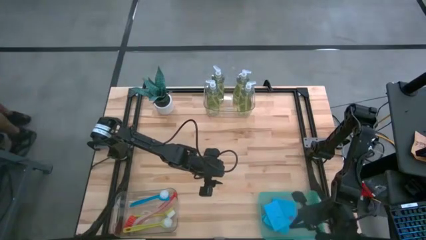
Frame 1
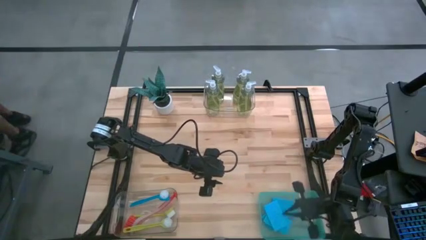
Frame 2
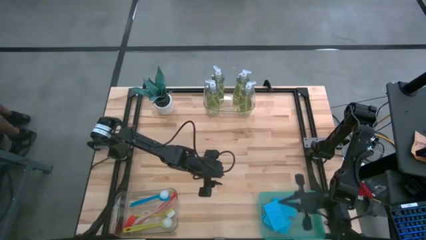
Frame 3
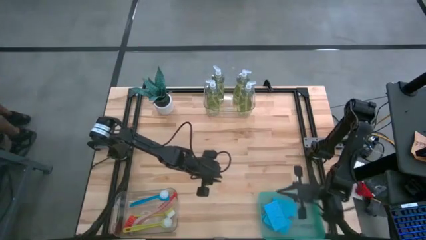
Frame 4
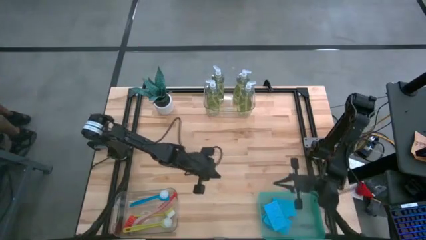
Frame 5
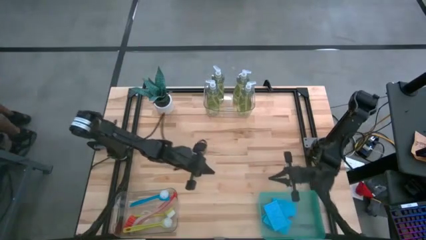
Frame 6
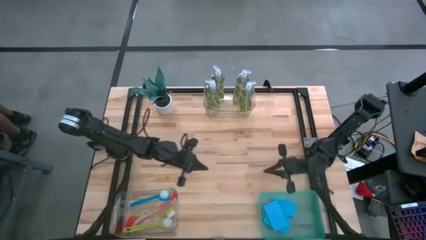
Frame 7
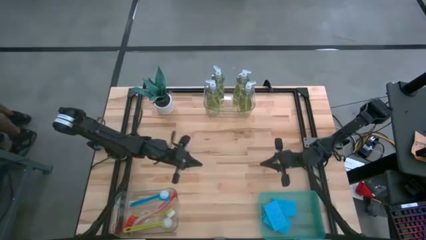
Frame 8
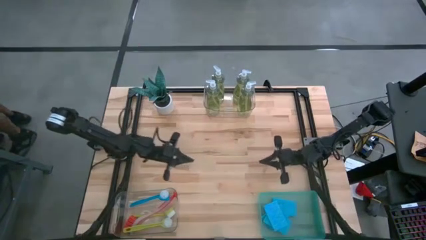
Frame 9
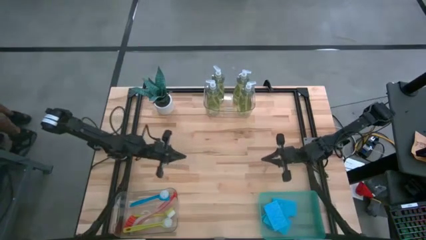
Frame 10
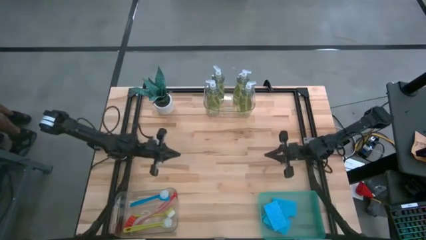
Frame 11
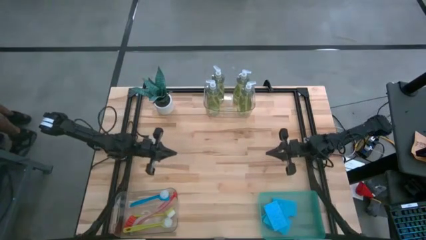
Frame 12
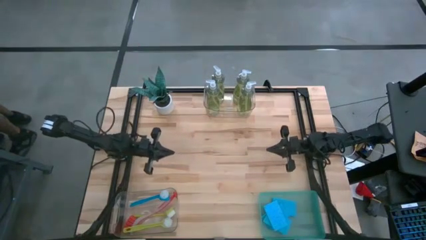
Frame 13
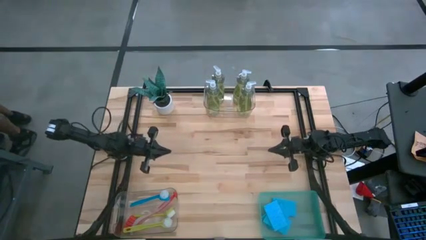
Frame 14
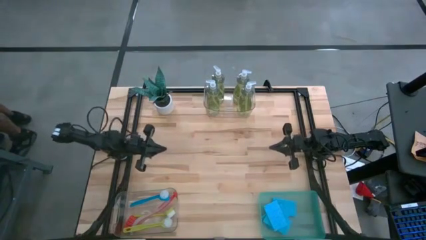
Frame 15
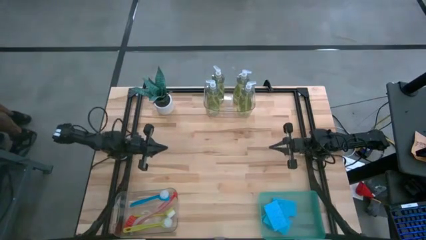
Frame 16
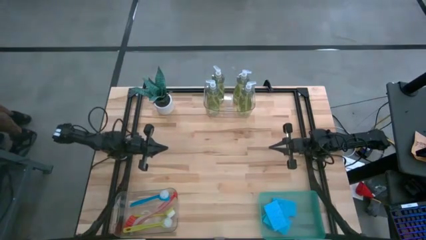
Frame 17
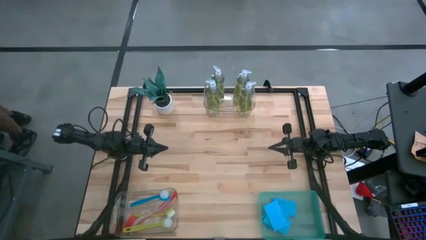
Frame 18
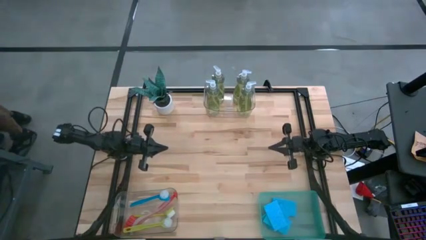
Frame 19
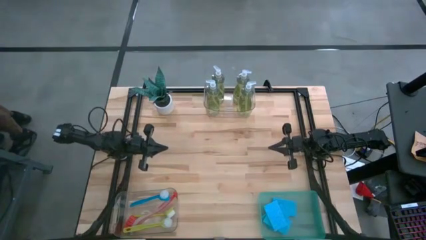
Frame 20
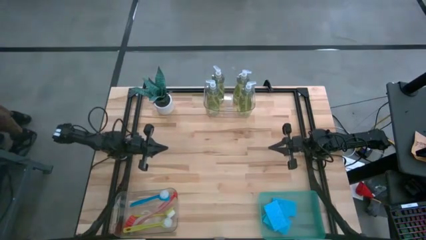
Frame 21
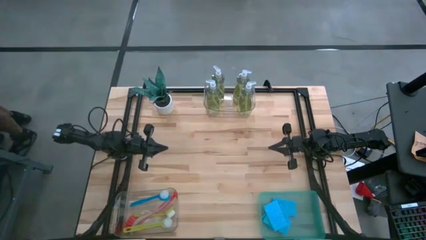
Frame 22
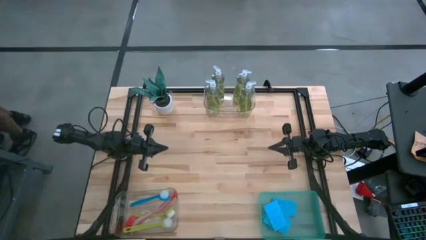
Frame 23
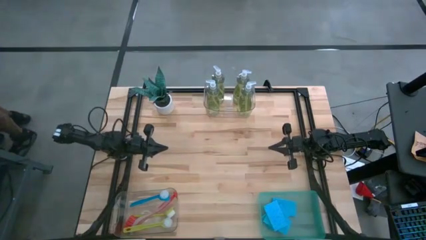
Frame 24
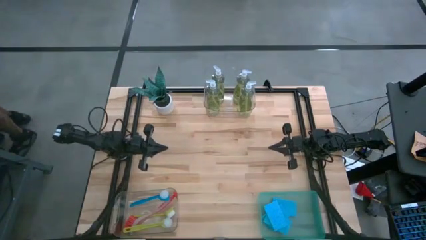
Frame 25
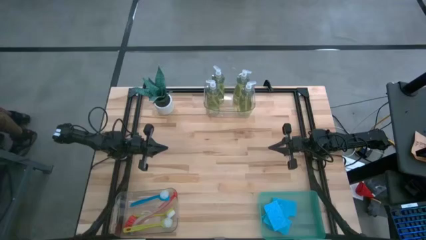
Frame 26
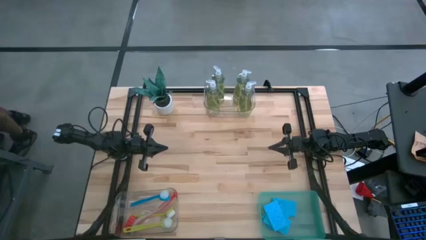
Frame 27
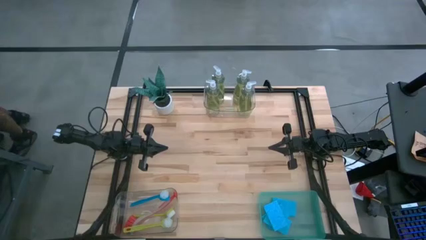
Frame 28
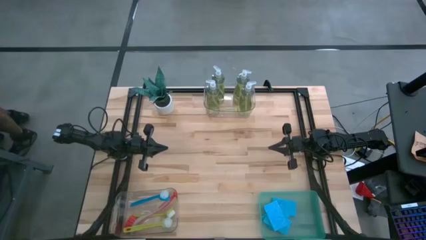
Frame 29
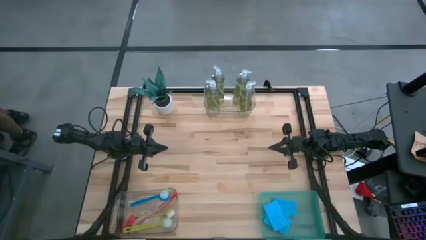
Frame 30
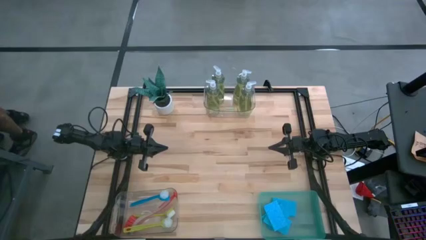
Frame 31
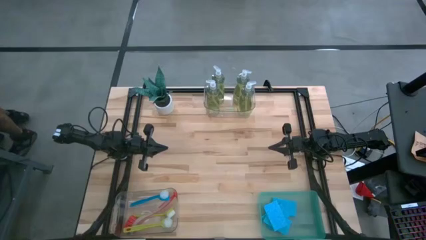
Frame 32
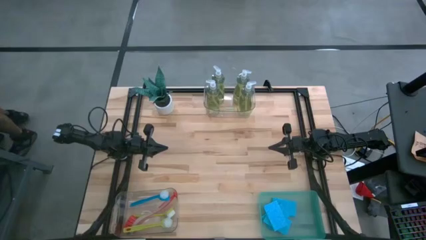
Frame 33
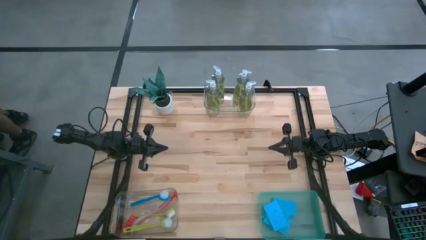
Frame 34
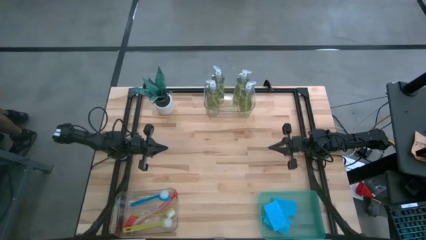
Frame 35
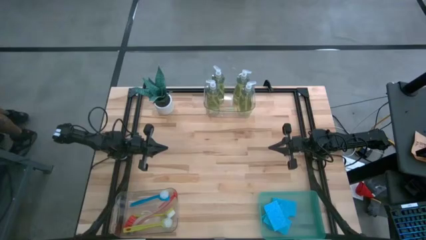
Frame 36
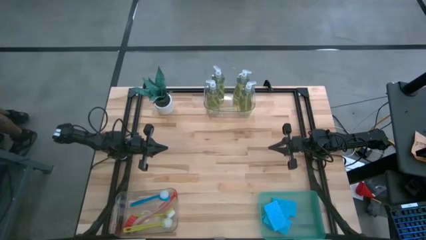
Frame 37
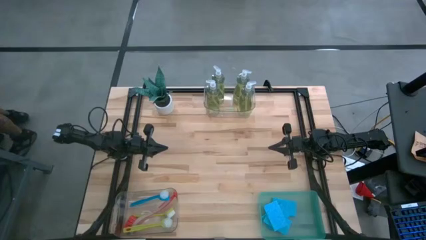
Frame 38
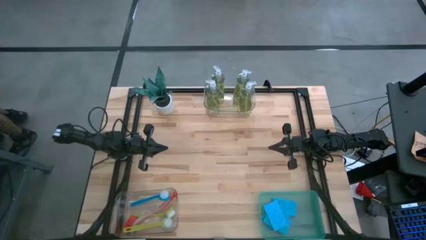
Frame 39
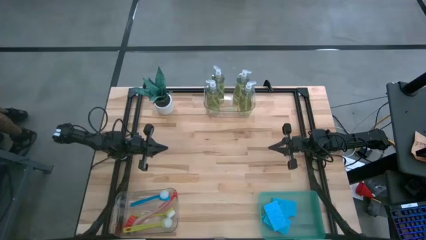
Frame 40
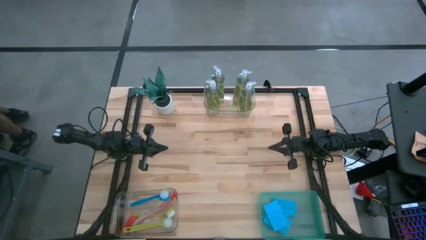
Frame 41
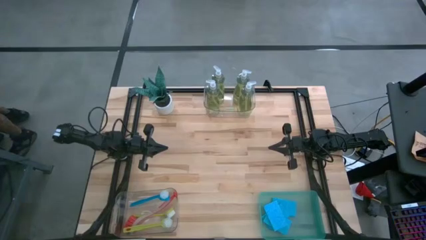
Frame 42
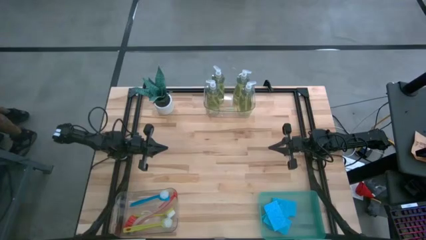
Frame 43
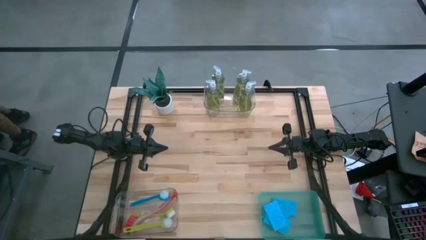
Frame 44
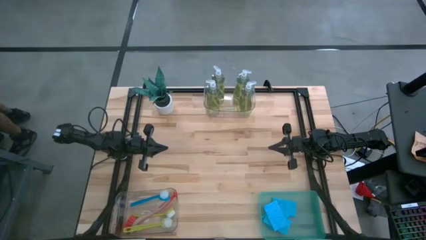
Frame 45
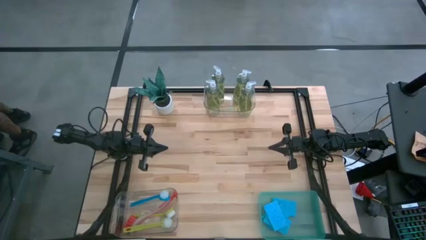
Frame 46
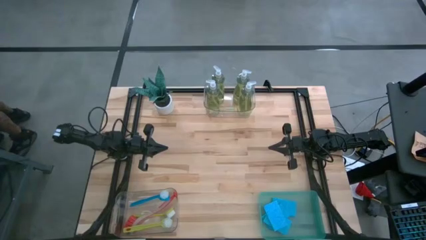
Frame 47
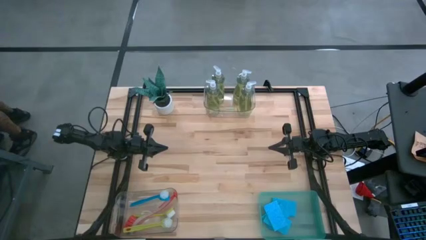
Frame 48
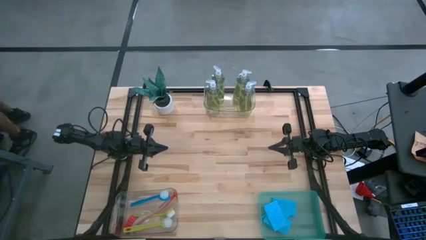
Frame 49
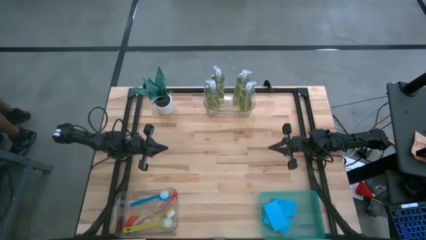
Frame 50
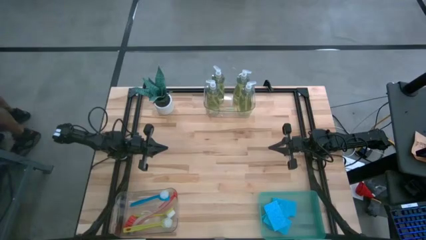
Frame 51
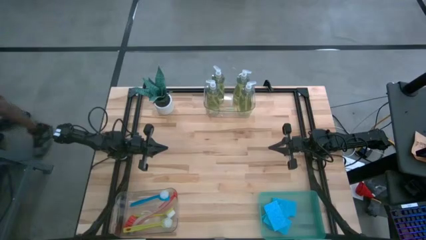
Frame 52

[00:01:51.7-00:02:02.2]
Task: Pick & Place Kitchen Sink Supplies
Return to Home Position

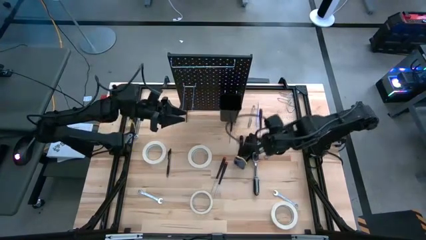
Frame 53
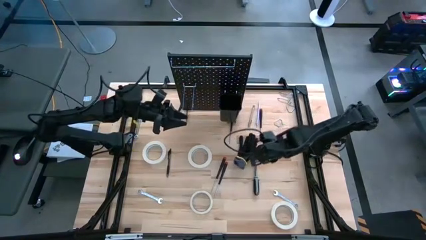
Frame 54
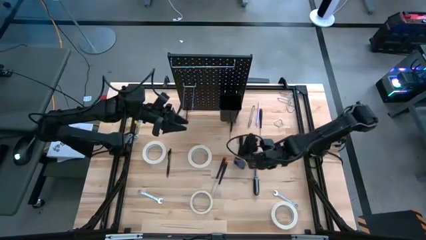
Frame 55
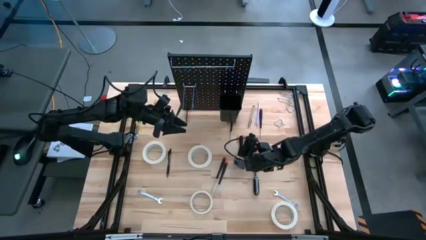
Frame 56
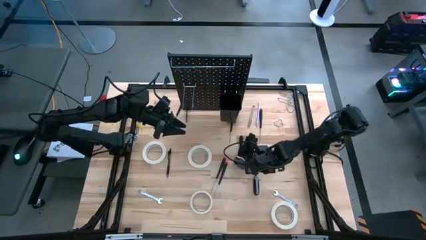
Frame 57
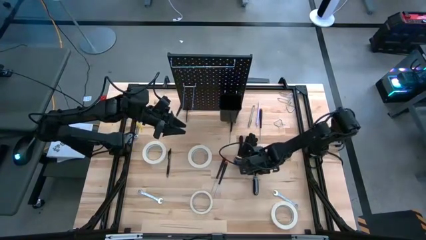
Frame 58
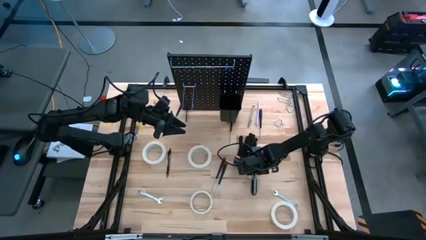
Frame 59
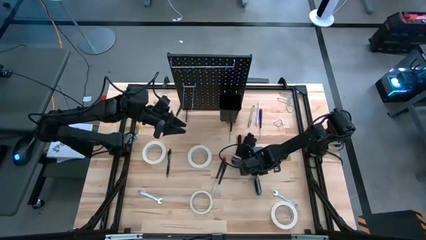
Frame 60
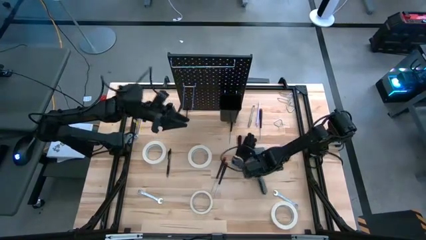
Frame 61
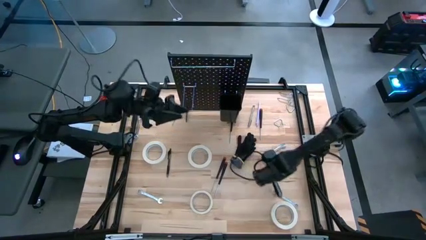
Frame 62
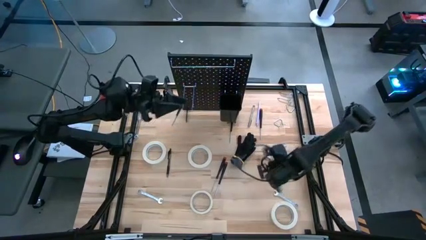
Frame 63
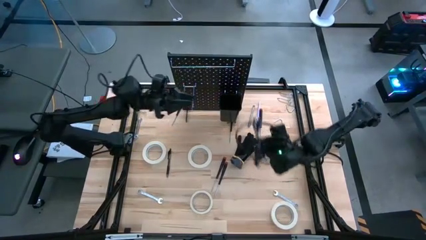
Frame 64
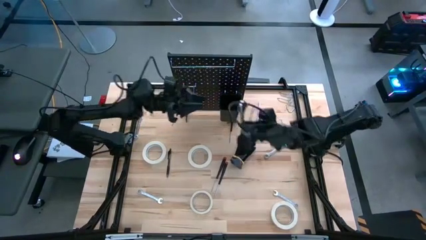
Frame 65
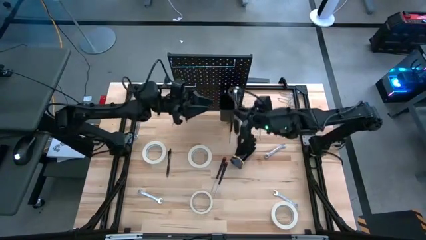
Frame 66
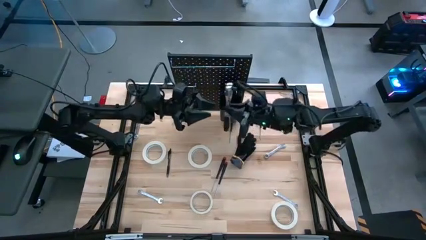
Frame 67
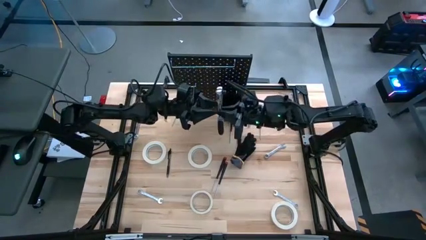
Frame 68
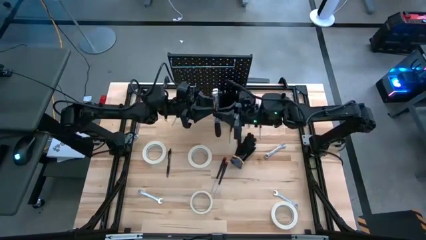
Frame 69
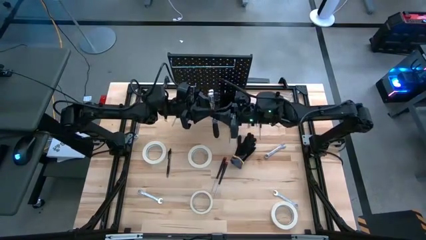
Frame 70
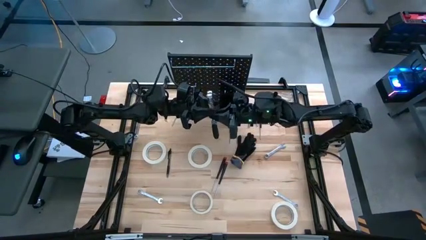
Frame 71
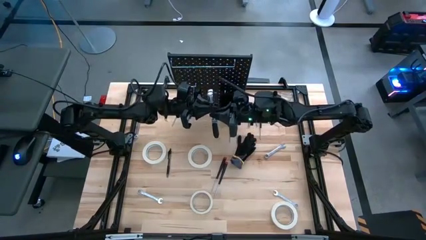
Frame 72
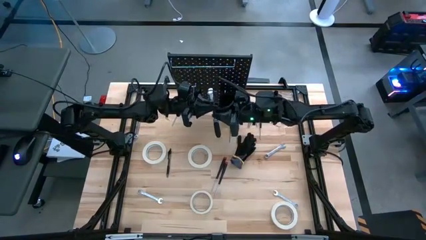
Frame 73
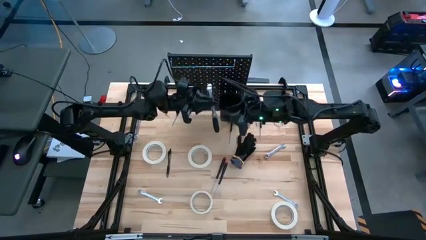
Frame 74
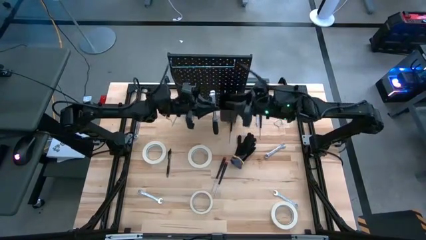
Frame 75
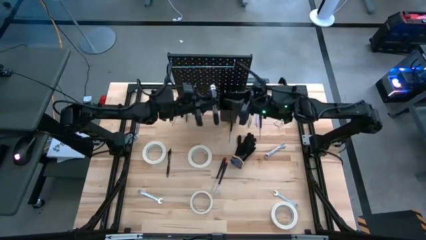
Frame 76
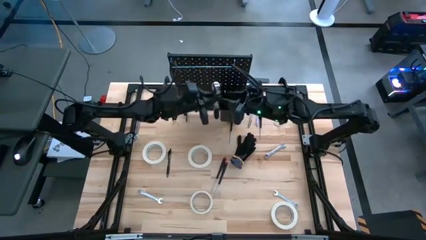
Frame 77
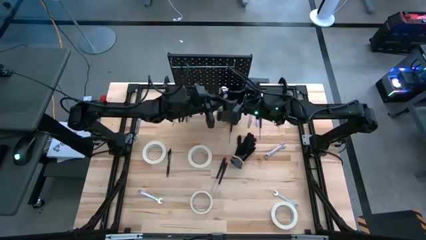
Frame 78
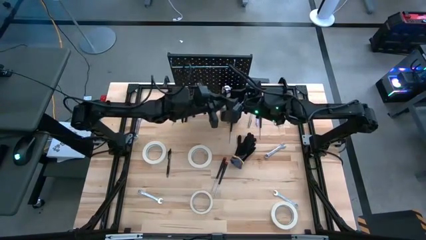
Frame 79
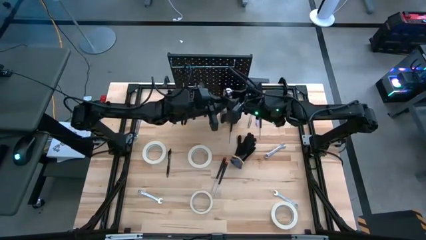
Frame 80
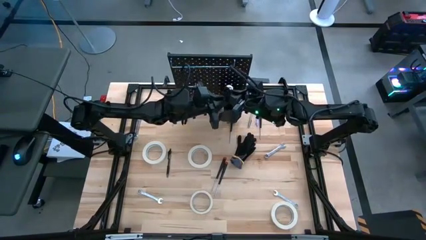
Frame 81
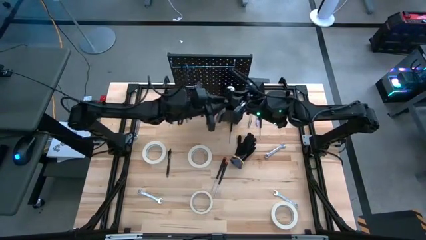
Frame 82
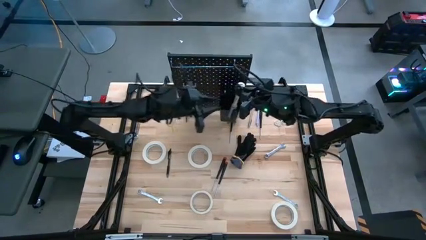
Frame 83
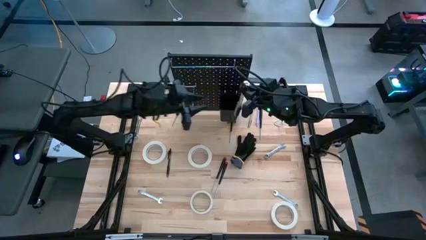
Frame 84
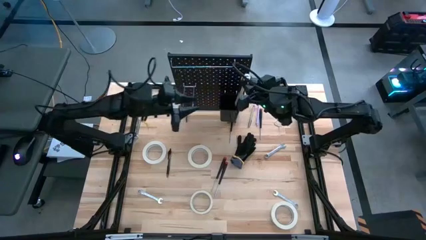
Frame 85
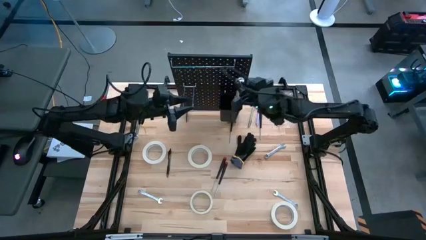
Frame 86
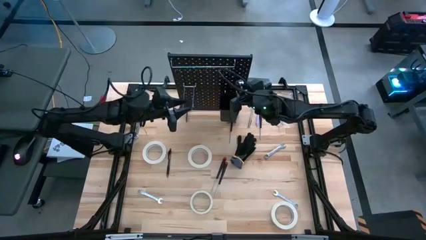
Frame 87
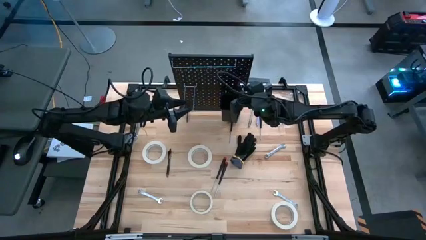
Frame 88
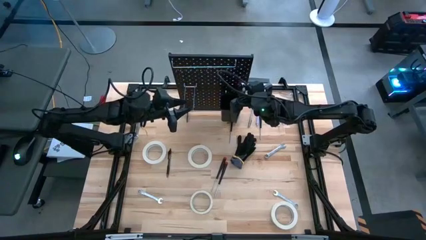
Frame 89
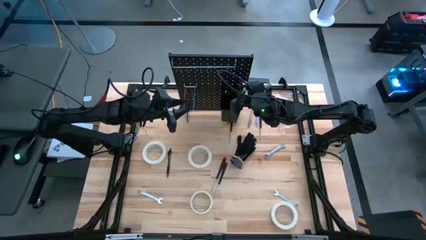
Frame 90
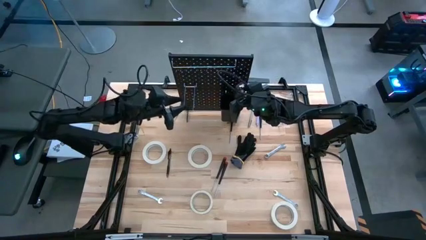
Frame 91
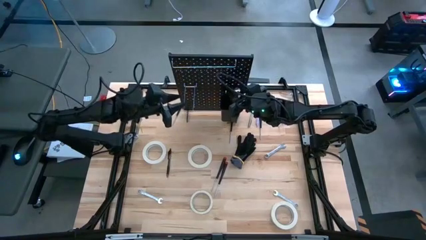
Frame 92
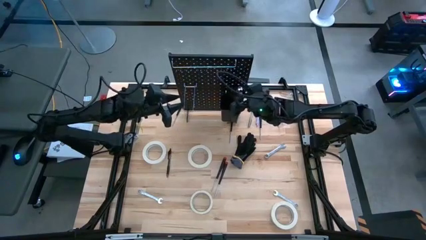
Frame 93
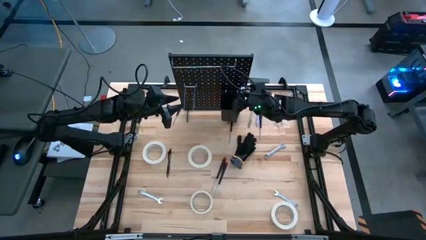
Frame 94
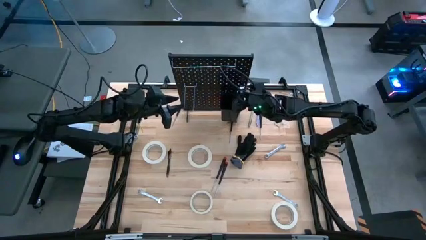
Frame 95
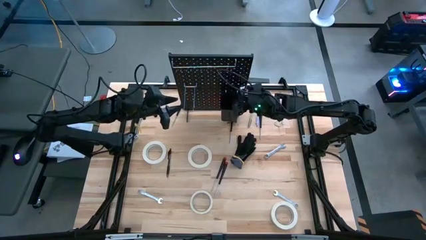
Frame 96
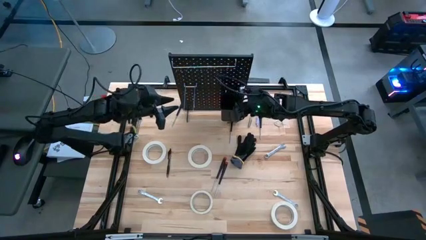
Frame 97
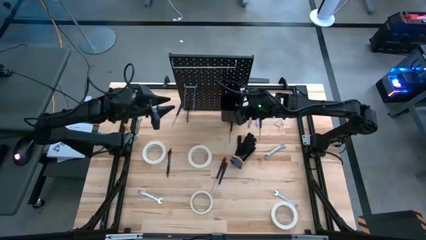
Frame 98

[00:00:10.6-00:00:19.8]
Task: Hang tools onto peg board
Hang the ratchet tool onto the pegboard
